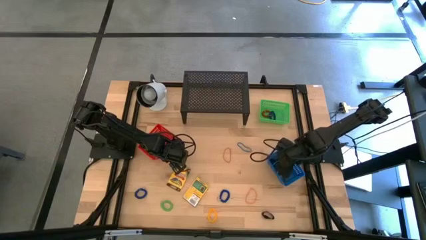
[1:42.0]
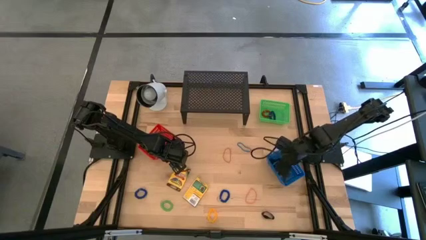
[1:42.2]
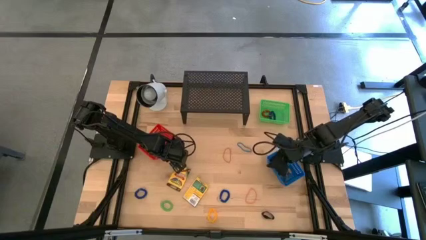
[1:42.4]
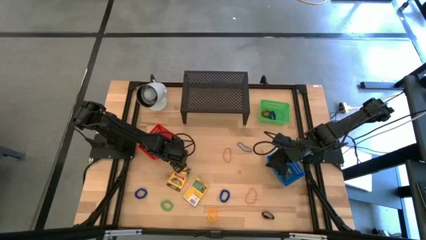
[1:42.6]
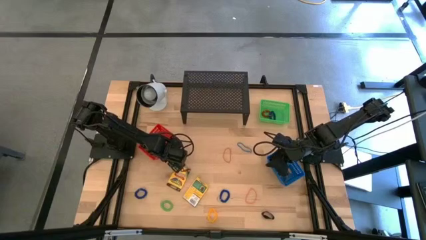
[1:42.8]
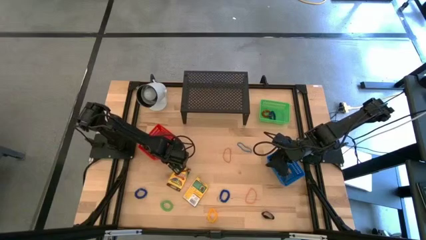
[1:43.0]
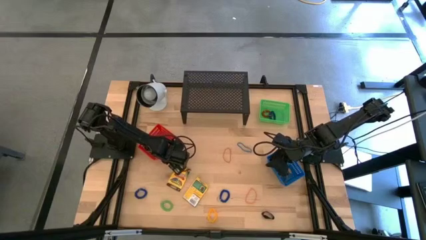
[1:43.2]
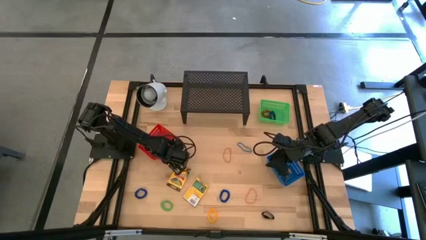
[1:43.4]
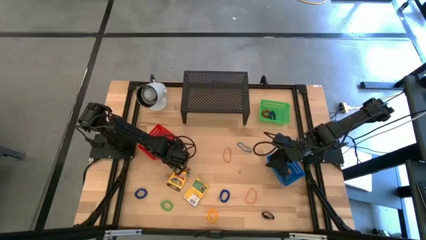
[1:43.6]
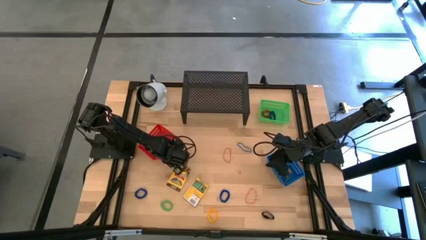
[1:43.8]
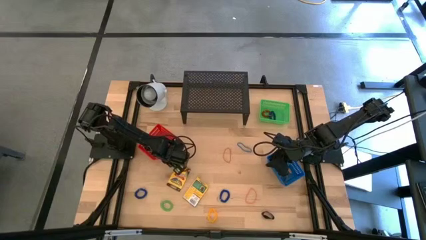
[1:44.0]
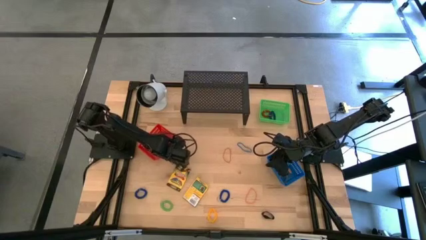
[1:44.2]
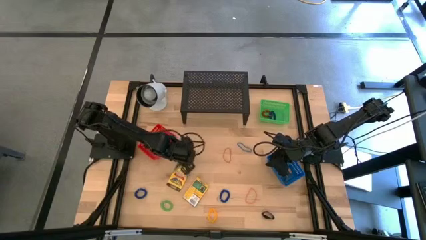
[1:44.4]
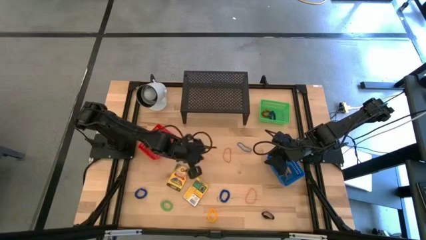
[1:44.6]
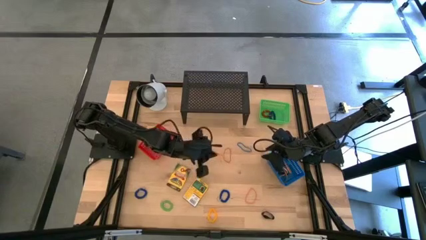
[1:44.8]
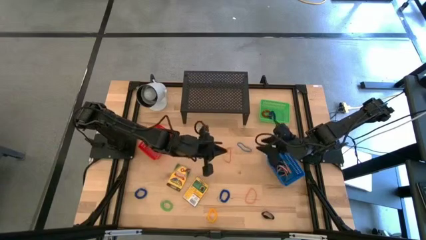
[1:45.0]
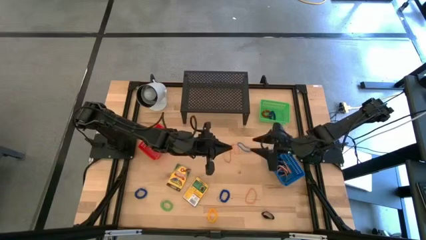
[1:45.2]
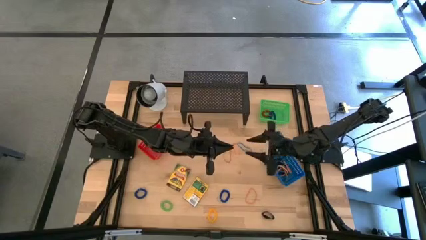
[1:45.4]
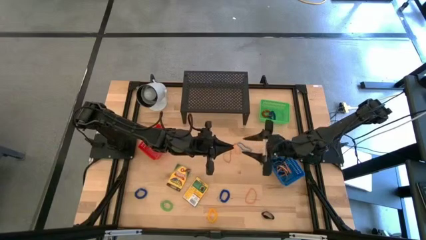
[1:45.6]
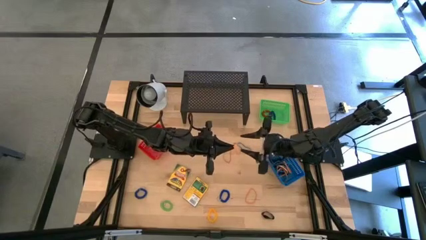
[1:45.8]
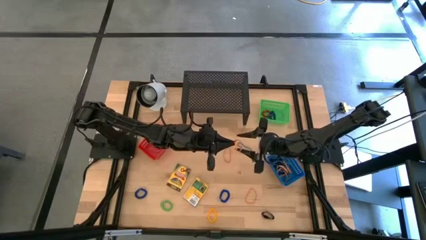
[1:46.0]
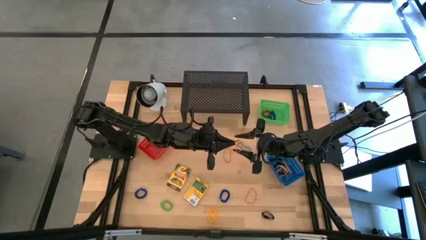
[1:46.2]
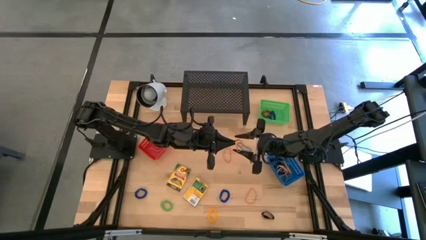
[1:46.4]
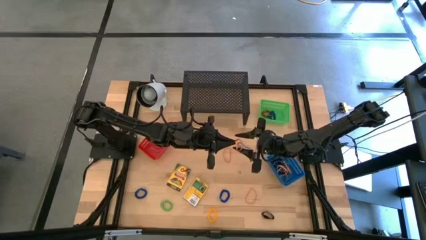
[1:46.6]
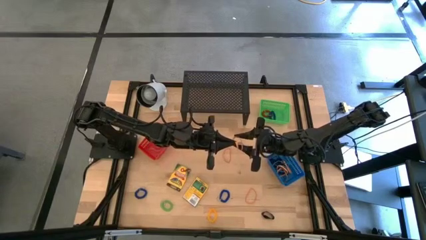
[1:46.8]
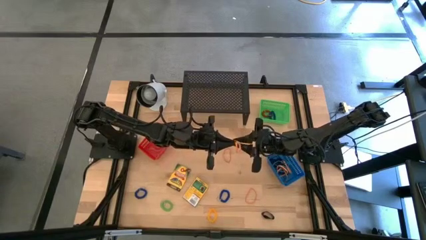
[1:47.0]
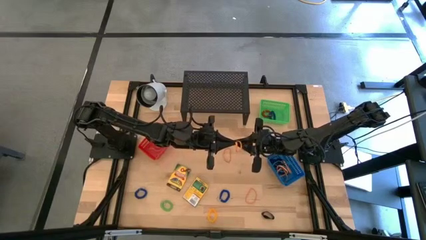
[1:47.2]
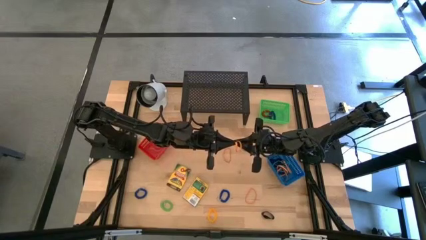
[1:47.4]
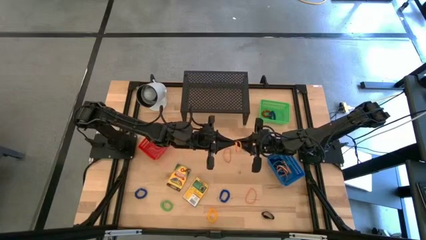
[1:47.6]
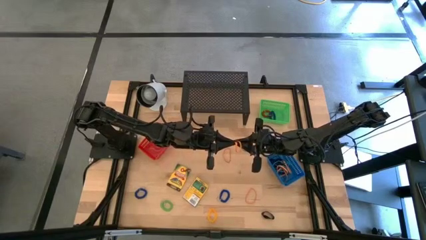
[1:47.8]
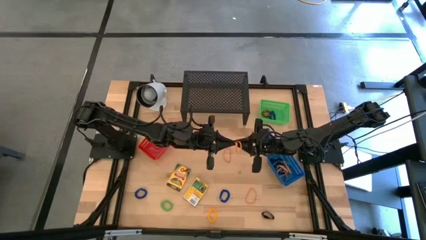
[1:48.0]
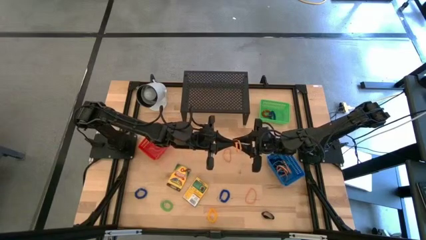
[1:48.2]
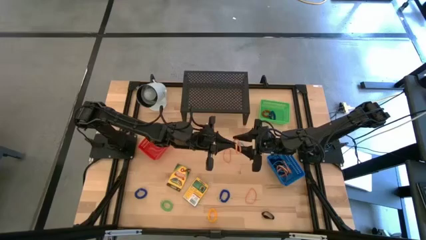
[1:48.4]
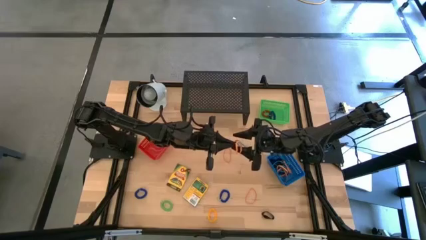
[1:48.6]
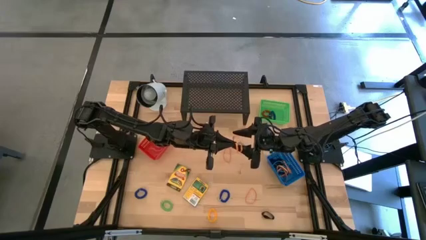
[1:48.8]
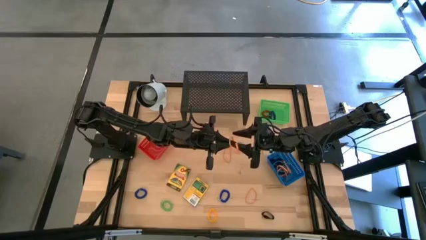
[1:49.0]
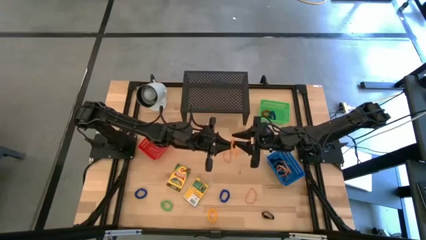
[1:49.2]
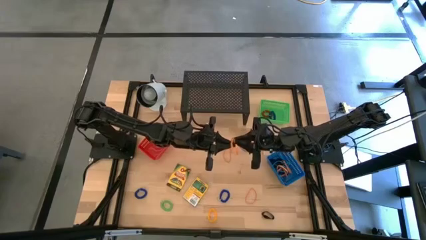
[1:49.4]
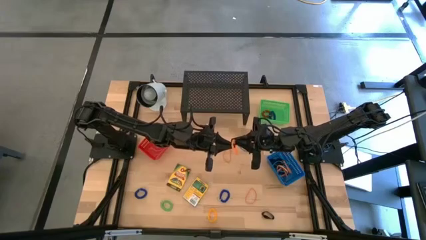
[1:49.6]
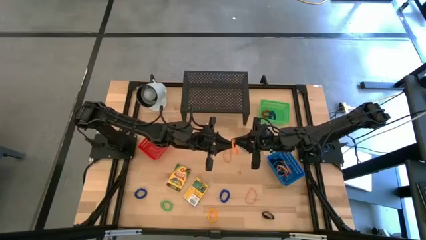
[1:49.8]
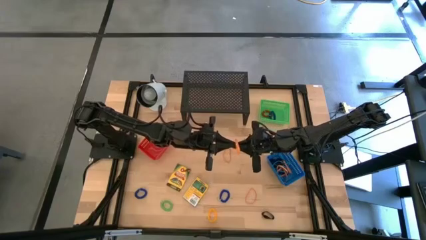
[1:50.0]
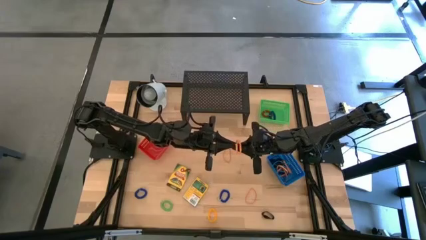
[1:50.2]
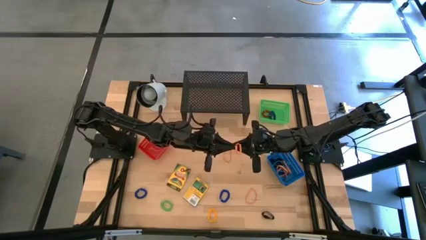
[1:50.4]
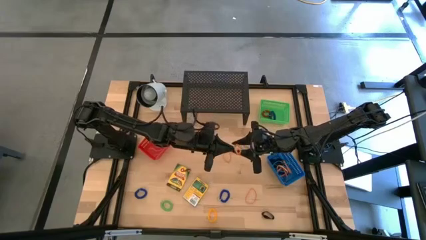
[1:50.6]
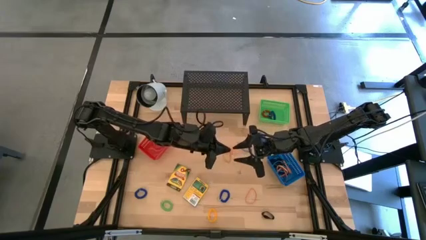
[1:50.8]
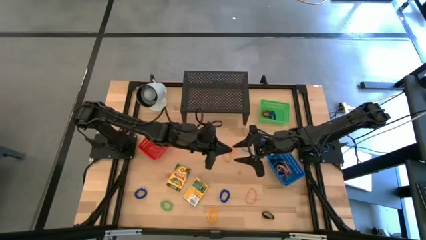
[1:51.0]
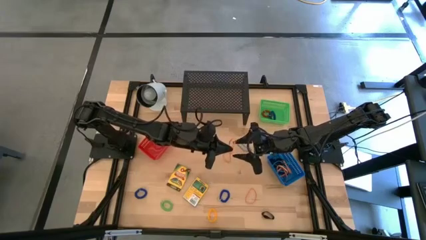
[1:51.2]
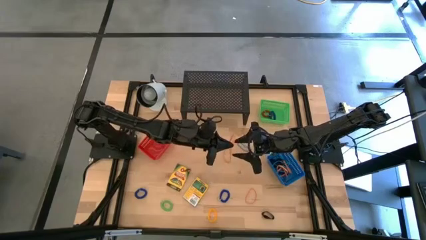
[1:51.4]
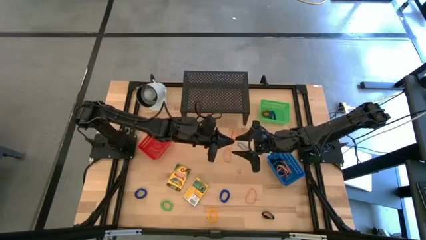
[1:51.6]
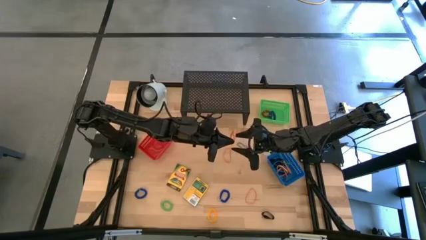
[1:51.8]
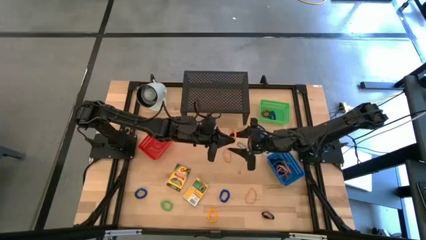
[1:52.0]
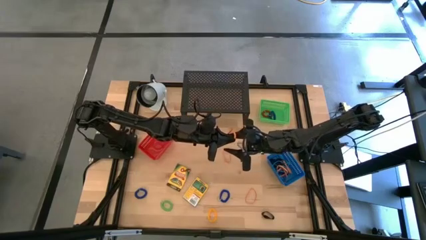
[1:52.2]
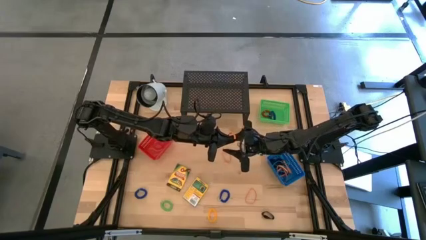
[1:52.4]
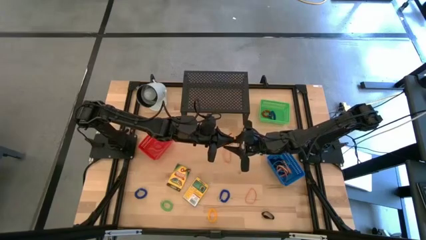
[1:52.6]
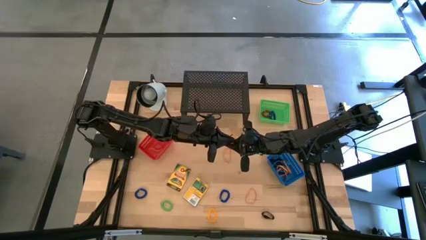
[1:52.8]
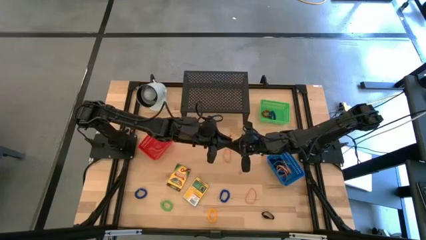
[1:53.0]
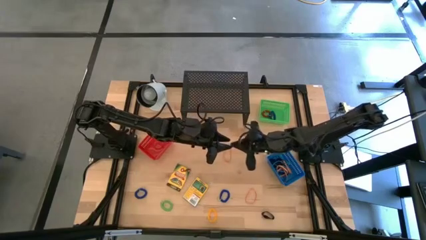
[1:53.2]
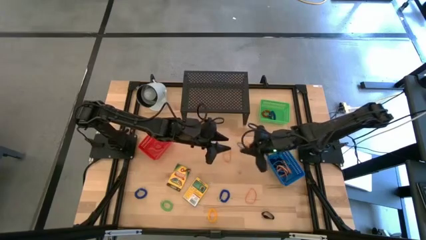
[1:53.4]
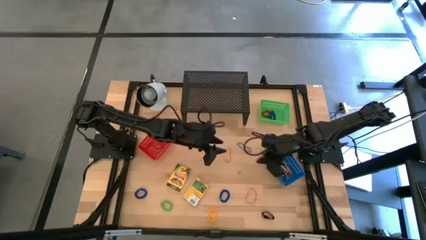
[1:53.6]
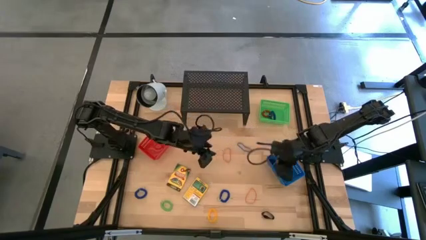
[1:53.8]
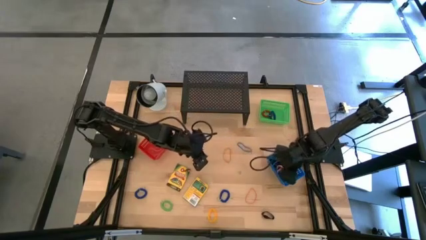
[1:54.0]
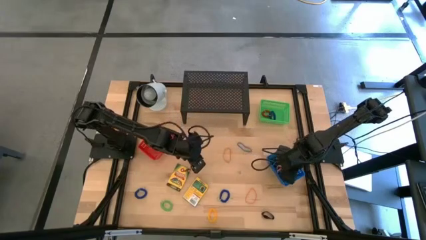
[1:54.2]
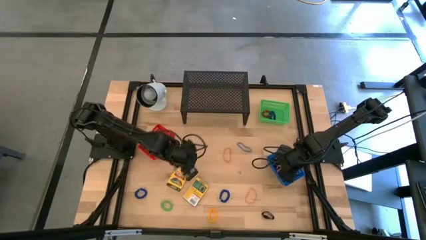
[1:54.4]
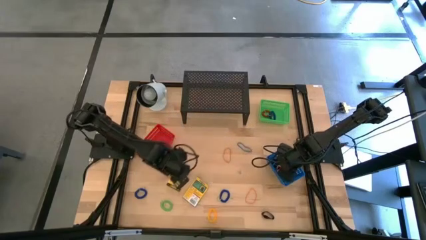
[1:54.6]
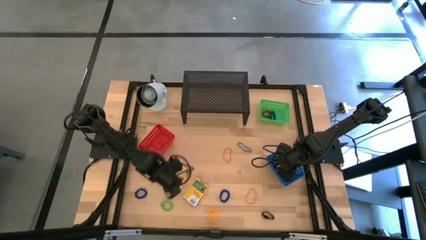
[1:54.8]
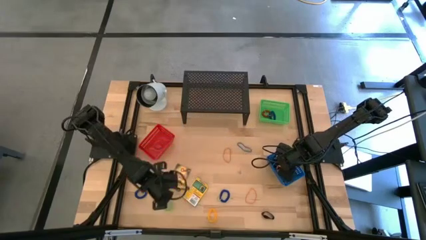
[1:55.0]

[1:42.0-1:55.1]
Task: Pick & Place Office Desk Supplies
Put the orange rubber band into the blue bin
